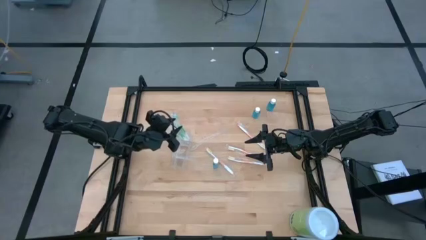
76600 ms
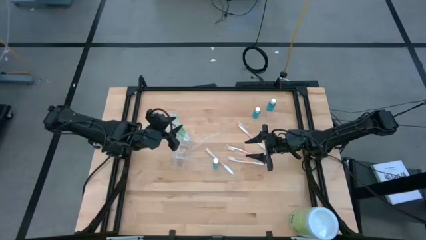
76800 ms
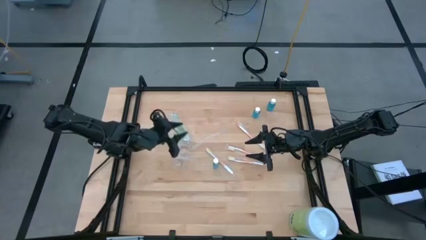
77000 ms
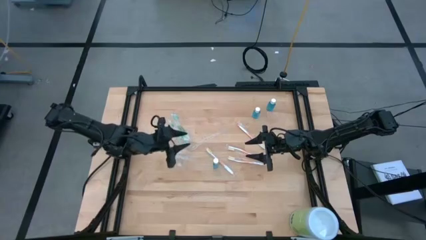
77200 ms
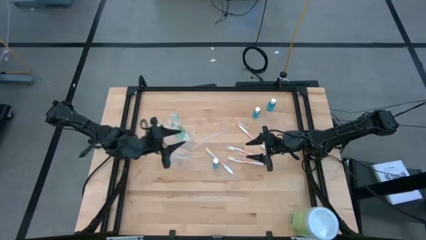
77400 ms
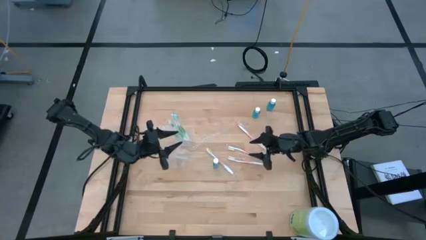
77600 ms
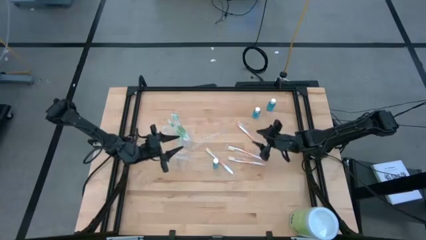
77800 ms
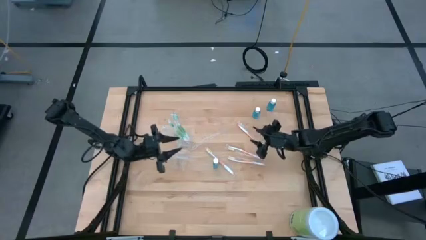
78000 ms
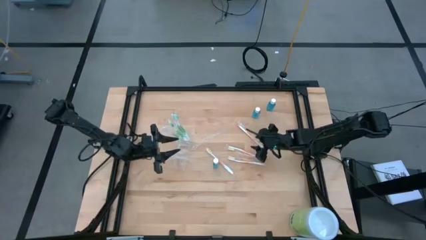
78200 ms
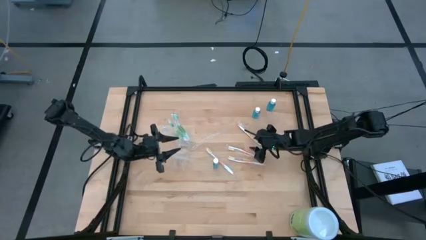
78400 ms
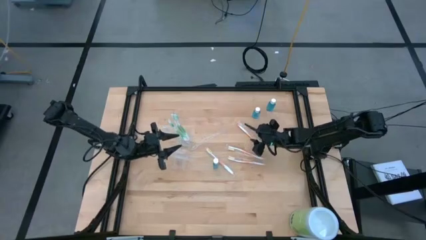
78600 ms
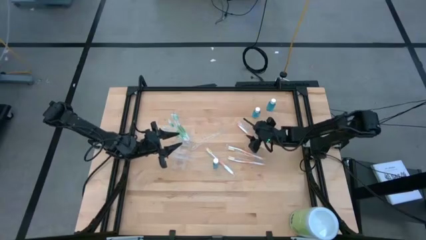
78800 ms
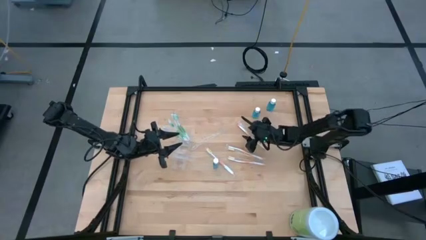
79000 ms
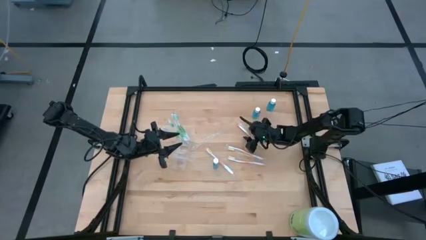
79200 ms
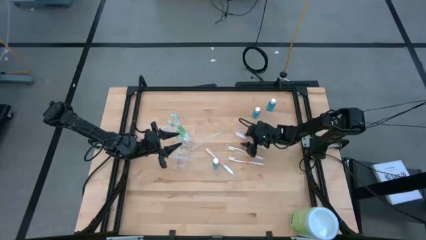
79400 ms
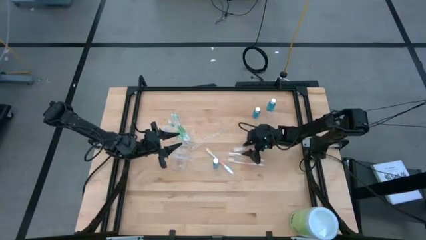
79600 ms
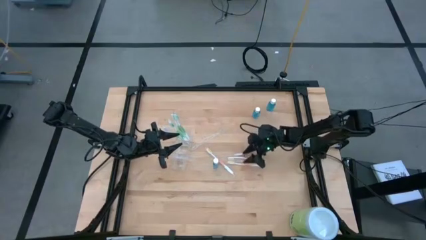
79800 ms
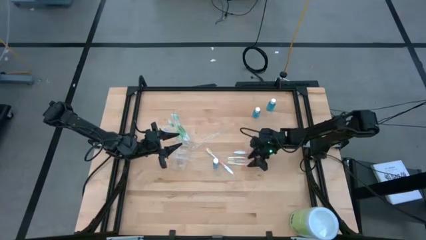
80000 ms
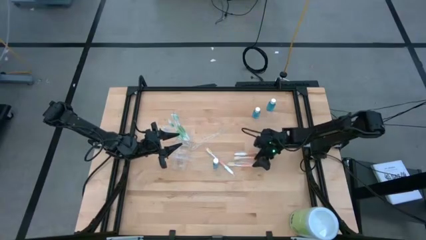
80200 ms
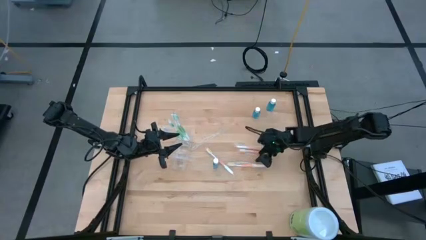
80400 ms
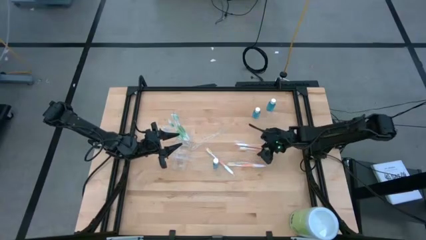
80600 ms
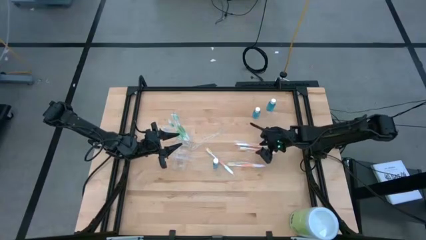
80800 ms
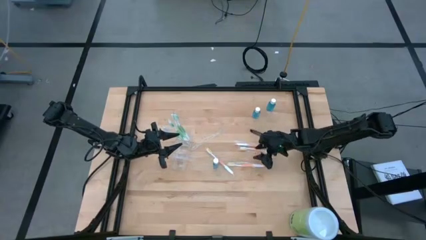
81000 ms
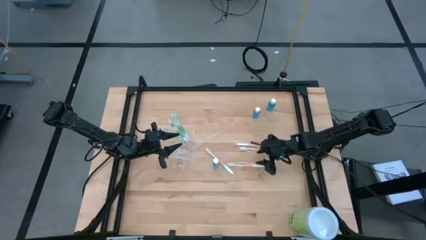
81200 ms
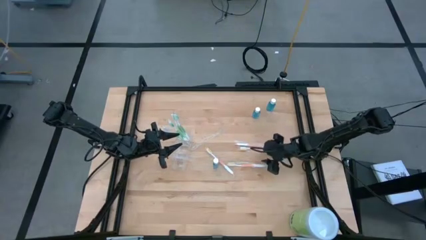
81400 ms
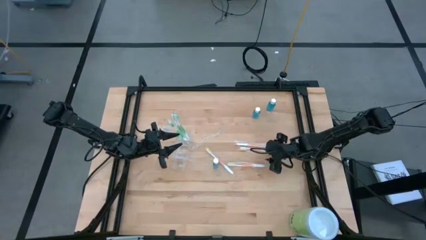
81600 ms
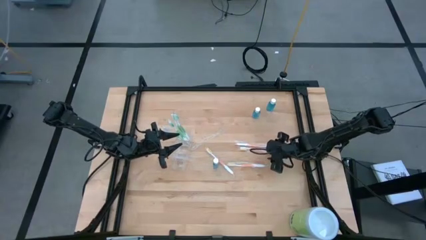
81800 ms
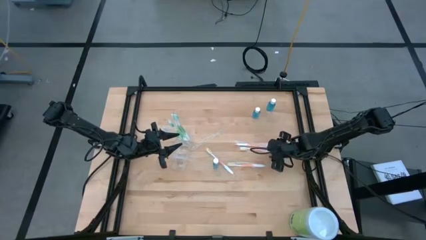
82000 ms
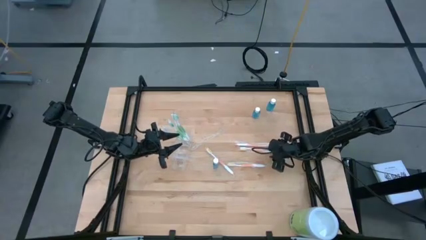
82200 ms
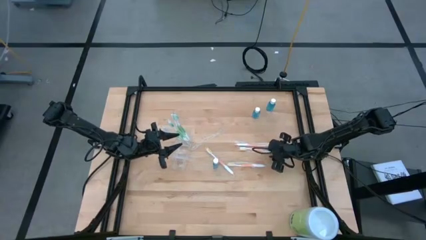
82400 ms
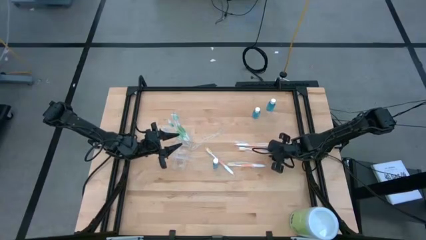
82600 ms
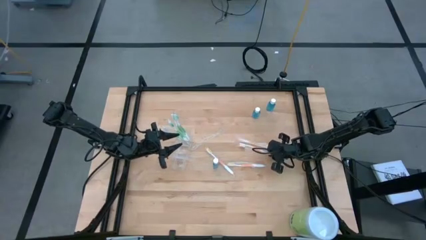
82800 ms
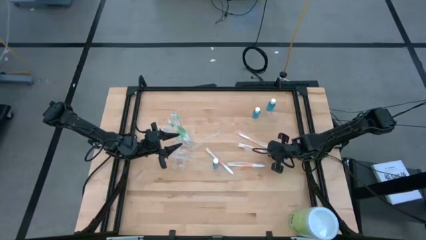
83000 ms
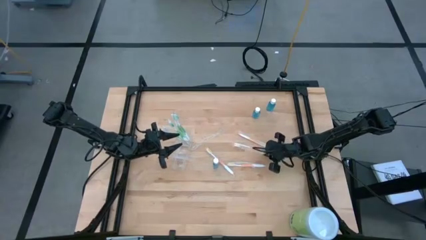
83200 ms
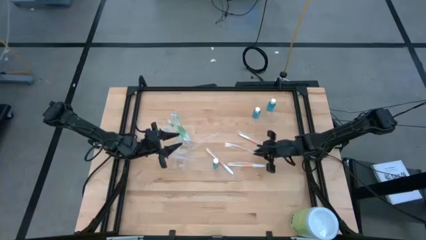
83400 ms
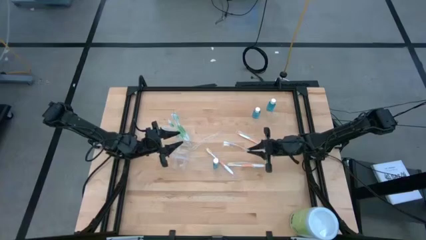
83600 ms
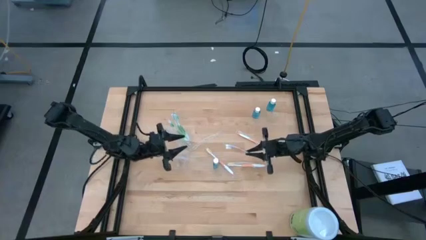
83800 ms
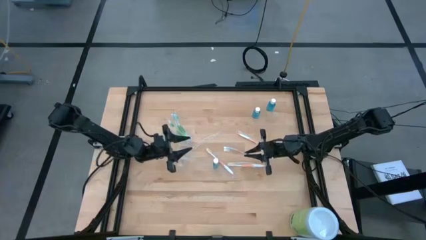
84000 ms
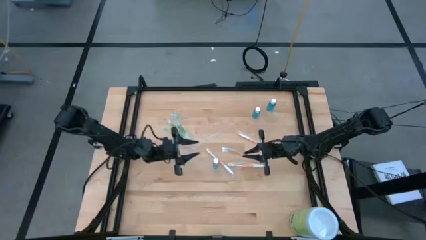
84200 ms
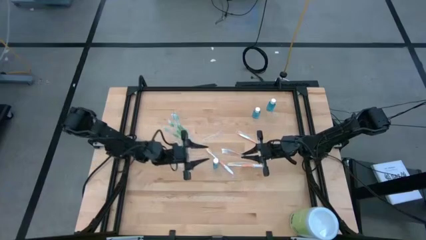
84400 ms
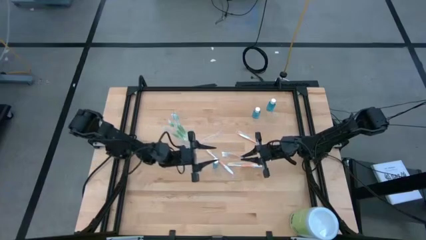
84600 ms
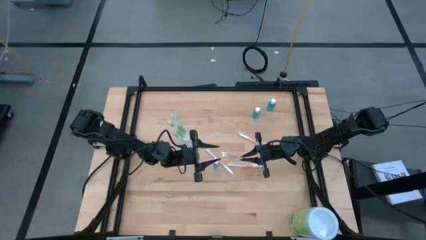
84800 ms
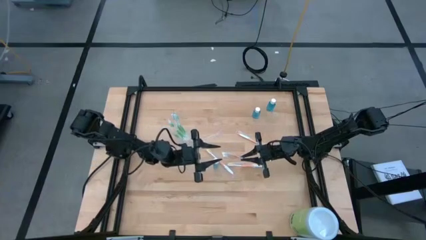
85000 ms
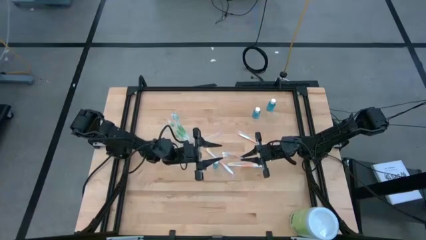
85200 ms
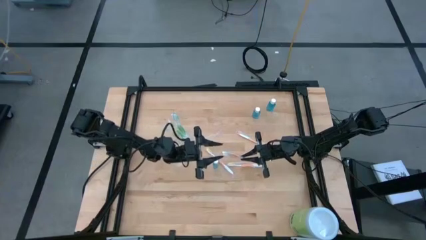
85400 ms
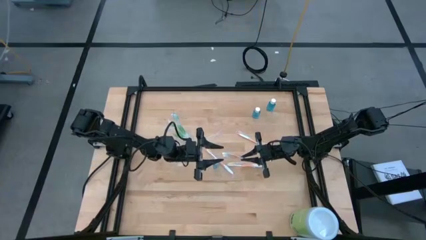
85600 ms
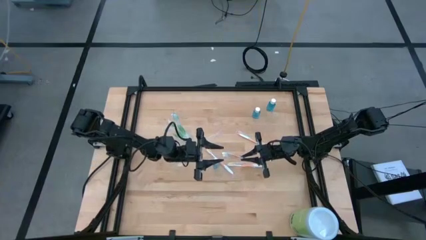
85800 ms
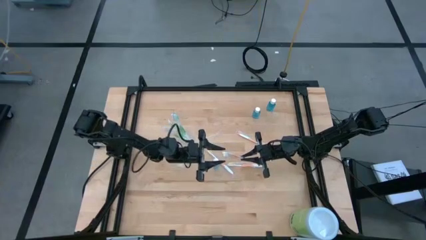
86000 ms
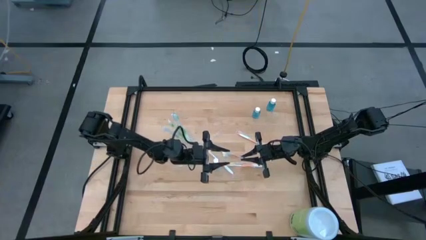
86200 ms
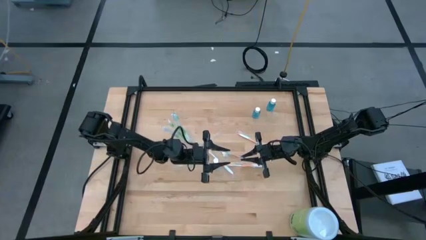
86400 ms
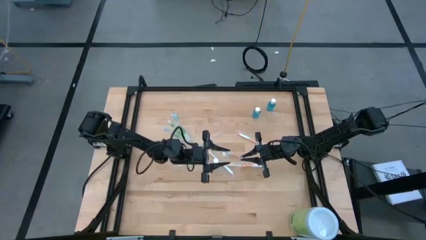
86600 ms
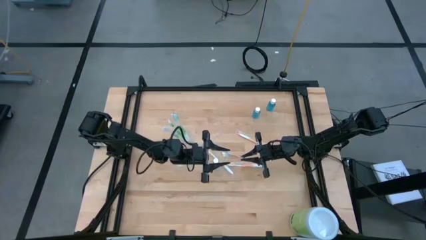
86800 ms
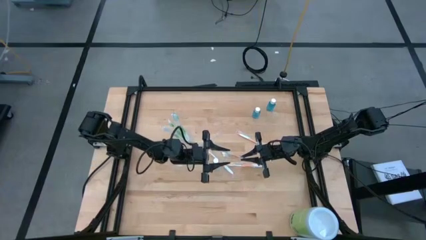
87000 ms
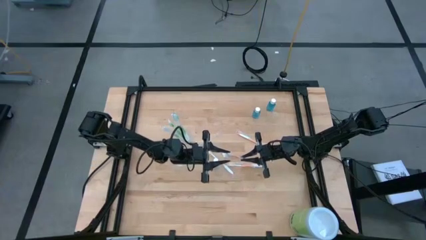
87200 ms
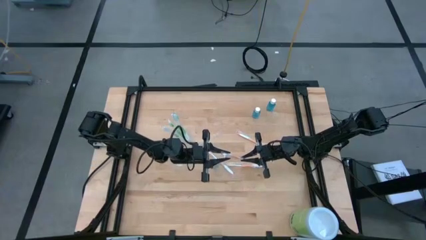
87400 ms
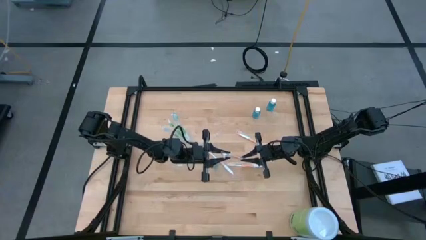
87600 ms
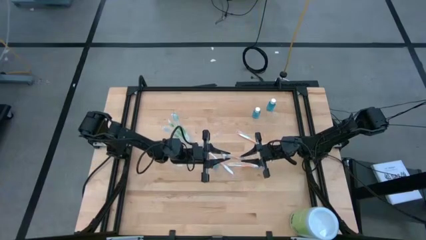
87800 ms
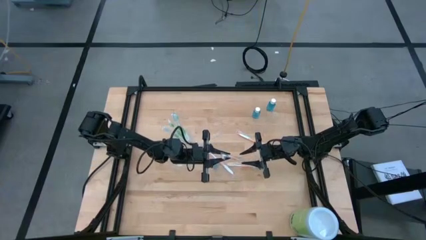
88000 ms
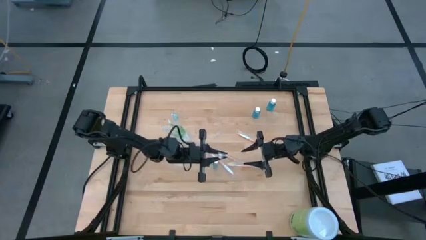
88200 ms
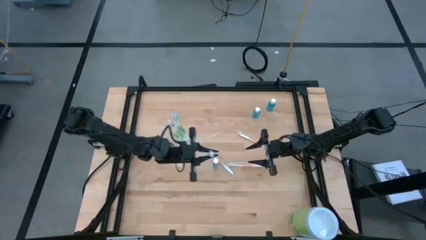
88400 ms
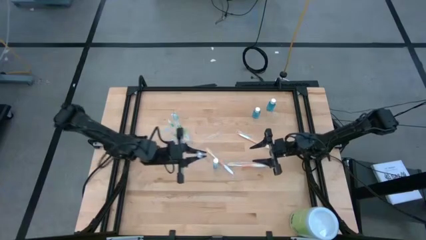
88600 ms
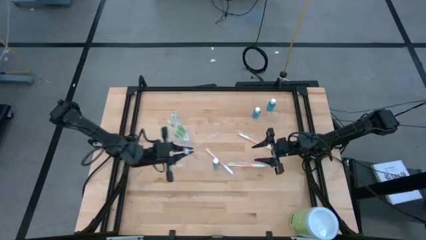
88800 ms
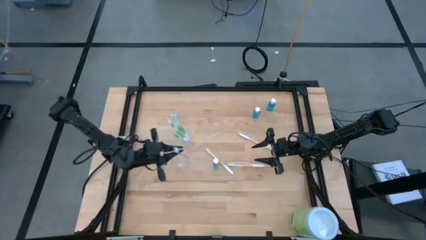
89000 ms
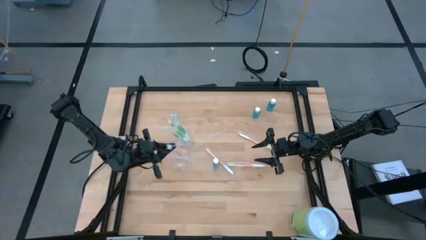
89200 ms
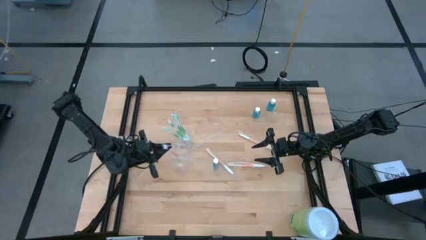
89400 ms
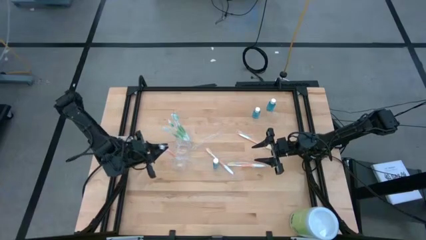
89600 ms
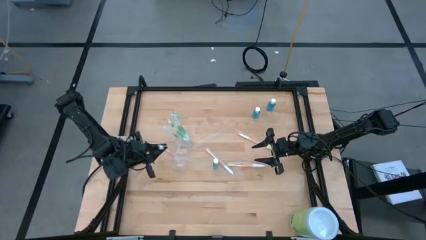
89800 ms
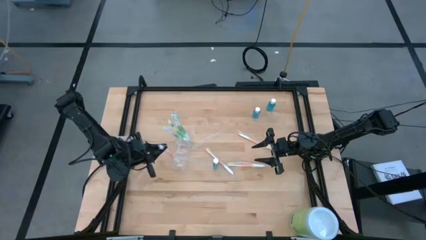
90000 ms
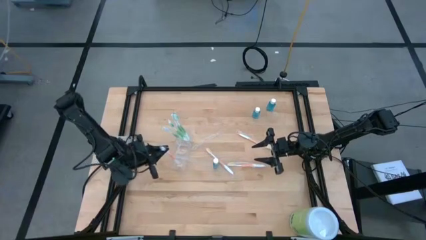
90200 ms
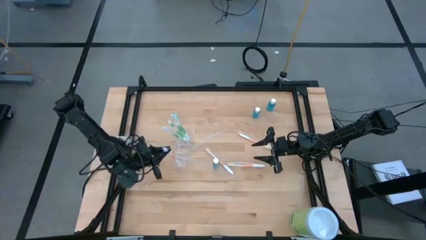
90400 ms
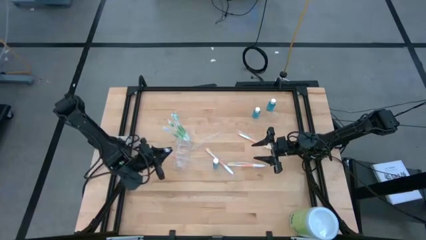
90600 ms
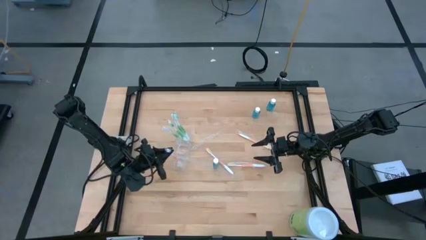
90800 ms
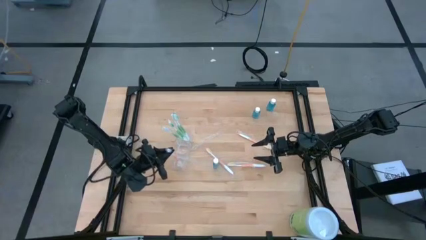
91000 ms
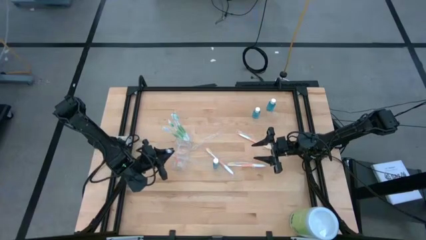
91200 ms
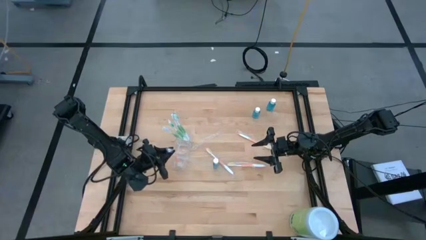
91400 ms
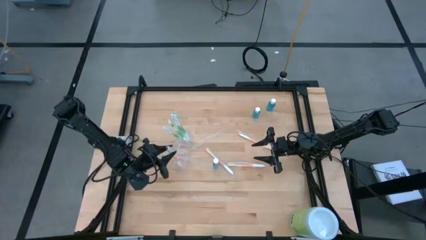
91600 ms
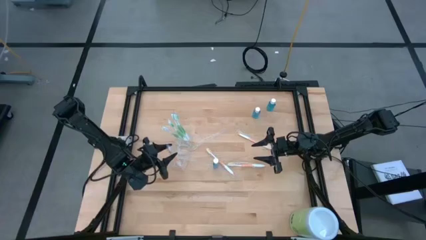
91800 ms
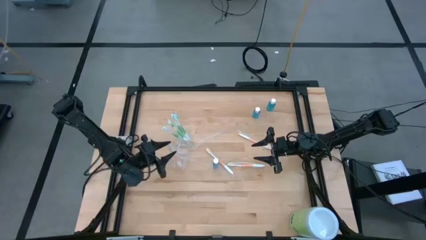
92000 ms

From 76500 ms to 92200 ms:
Task: Pick & Place toothbrushing station
Put the orange toothbrush into the bottom section of the transparent organizer

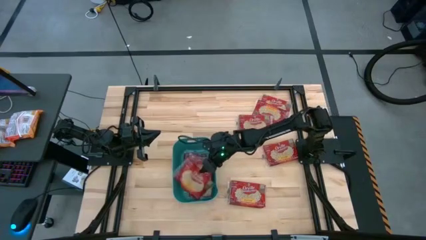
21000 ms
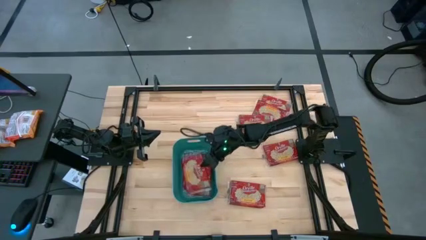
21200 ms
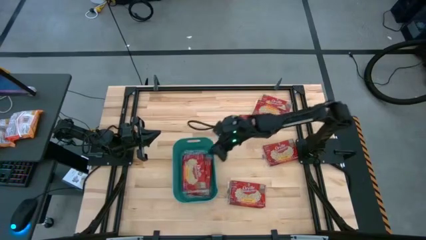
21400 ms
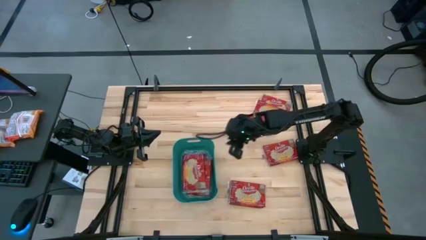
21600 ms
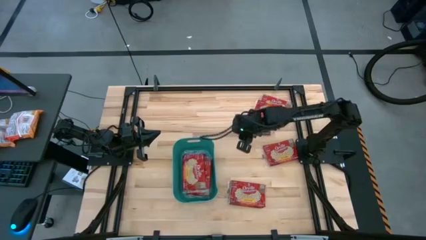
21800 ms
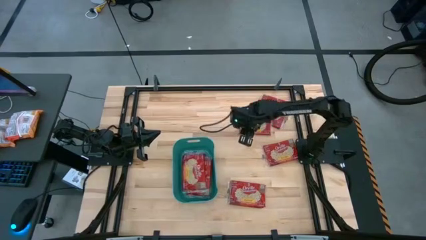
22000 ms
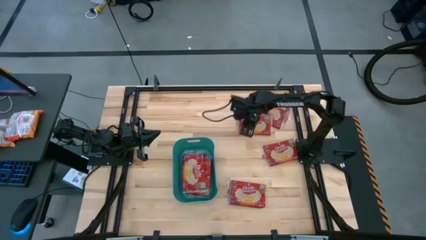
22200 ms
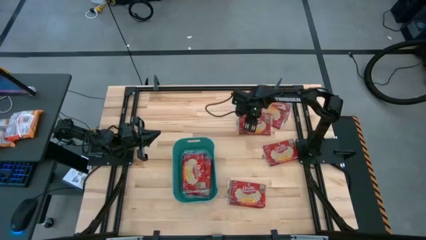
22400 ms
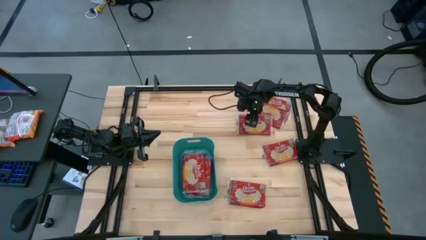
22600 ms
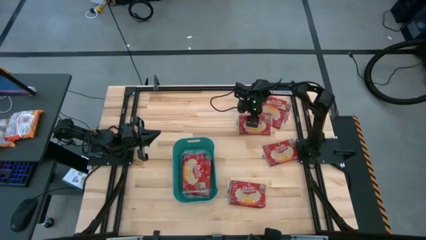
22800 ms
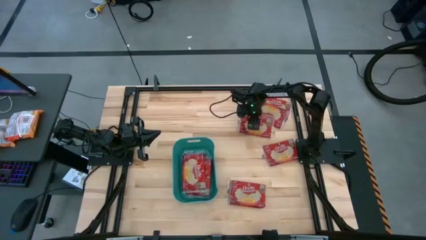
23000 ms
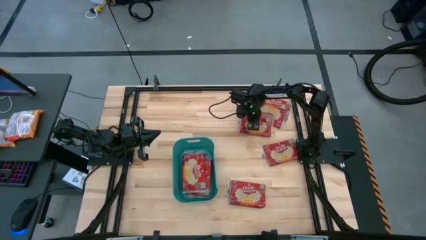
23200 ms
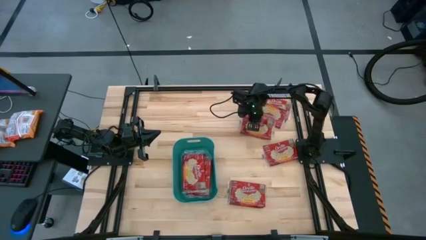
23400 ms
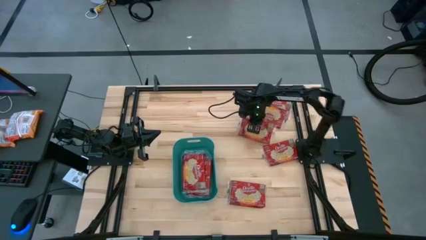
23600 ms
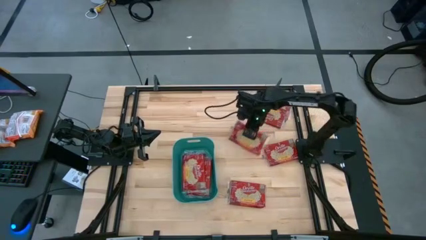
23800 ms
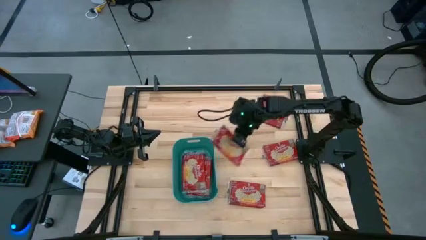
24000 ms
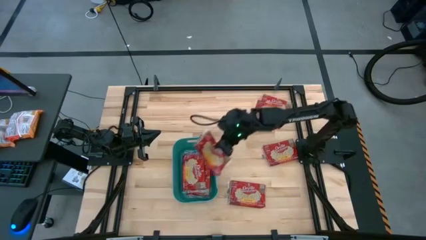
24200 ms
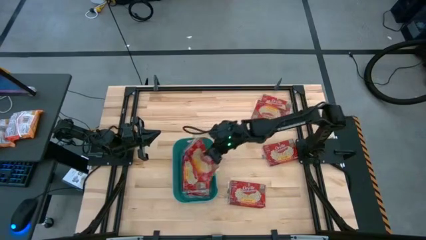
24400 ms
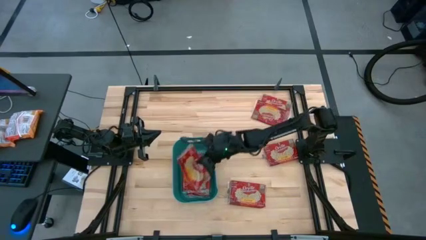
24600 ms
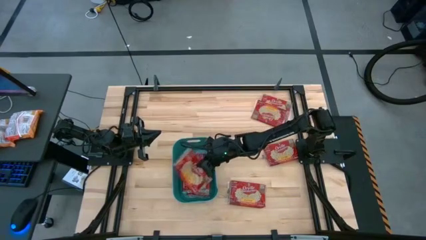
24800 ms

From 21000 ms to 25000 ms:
Task: Sort popcorn bags into baskets
Put the red popcorn bag into the green bin
